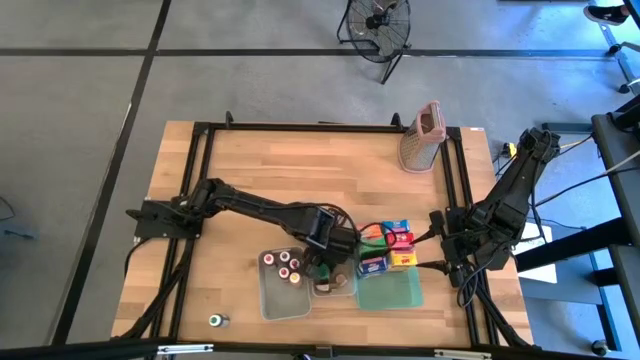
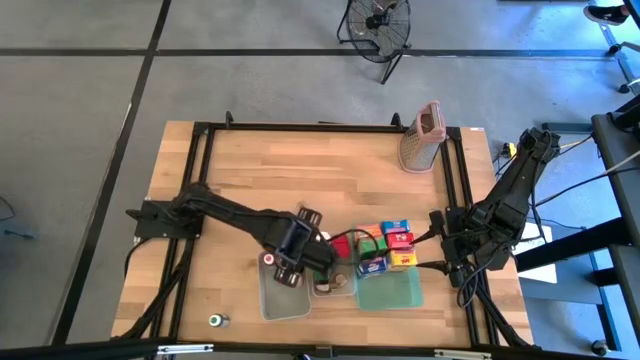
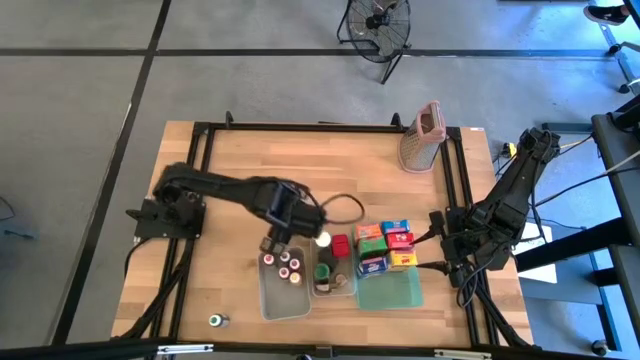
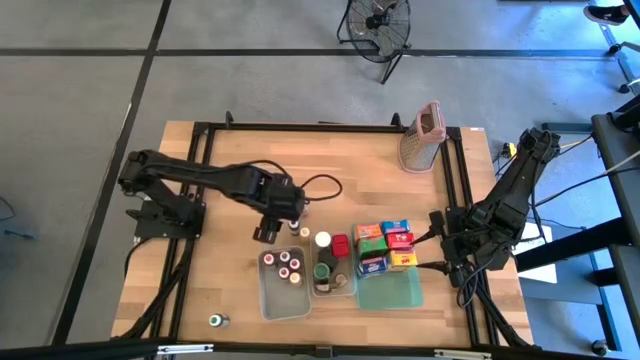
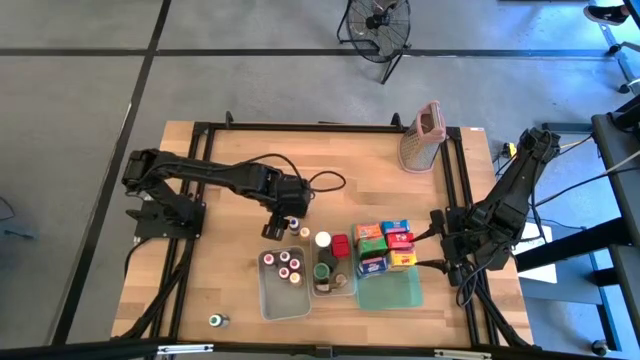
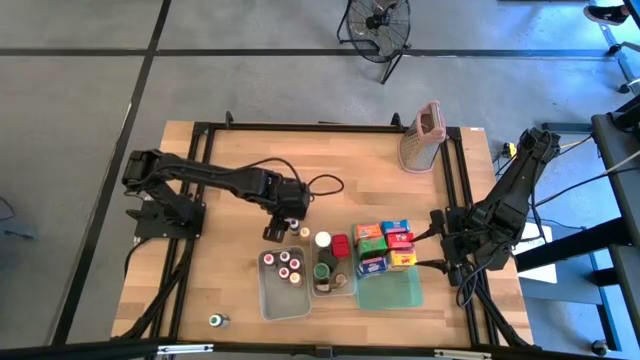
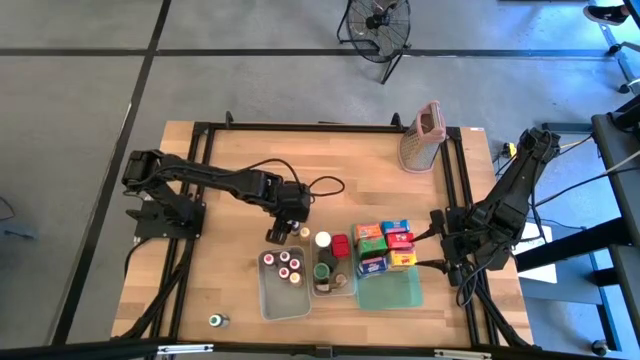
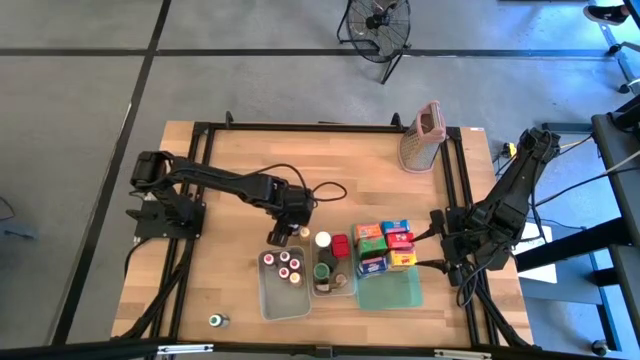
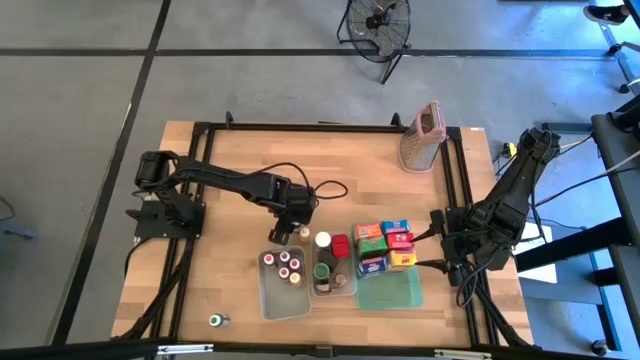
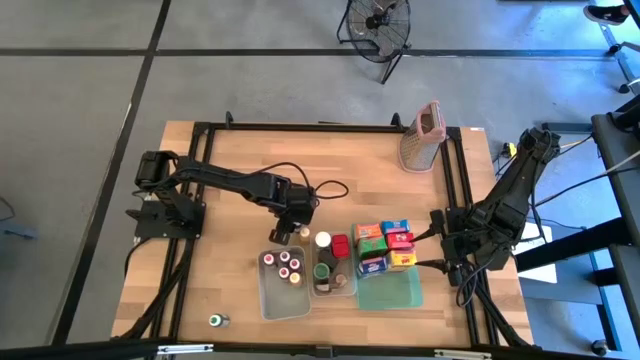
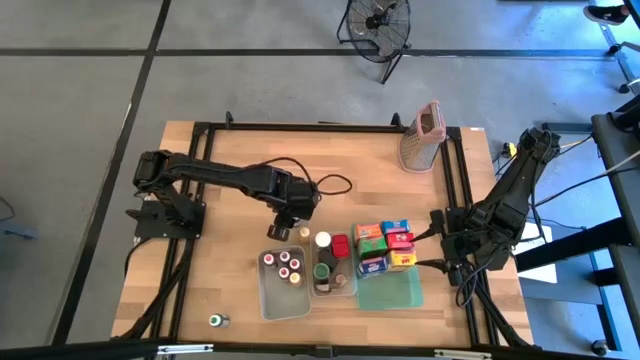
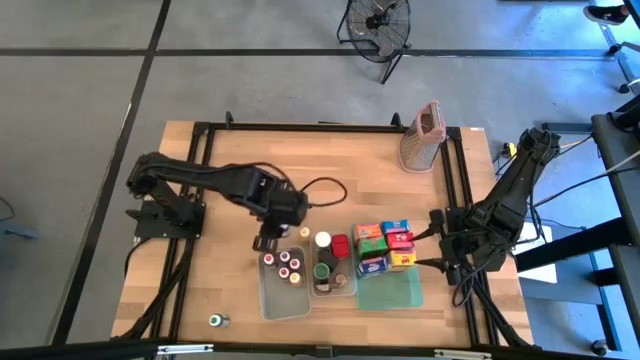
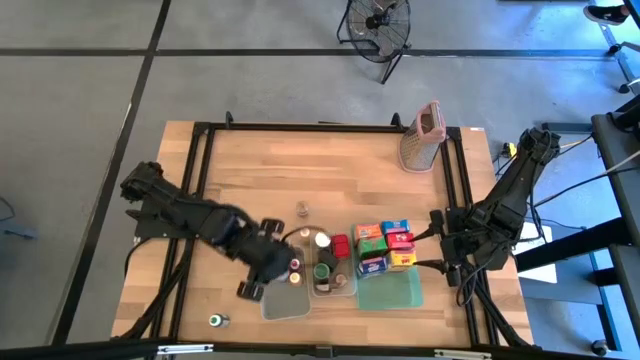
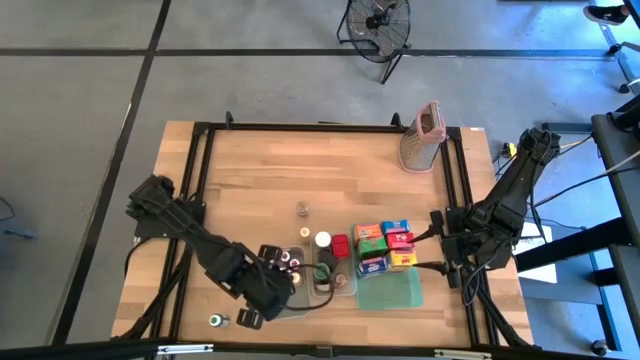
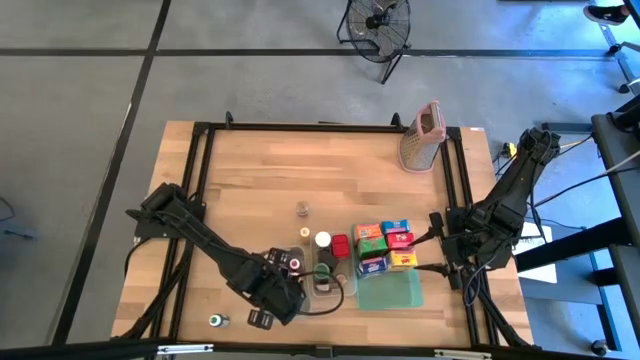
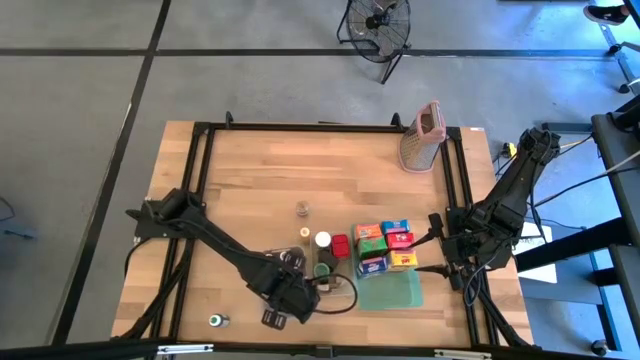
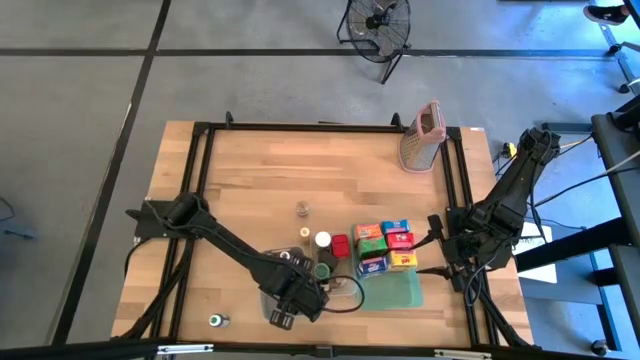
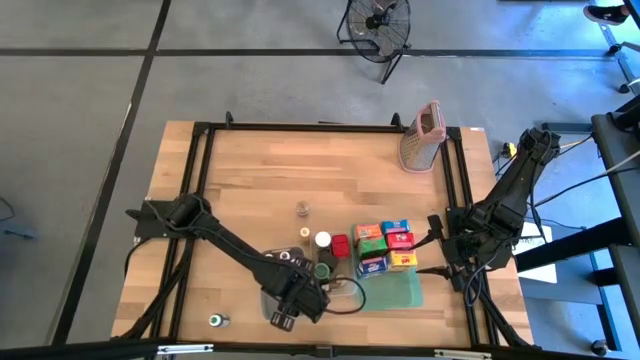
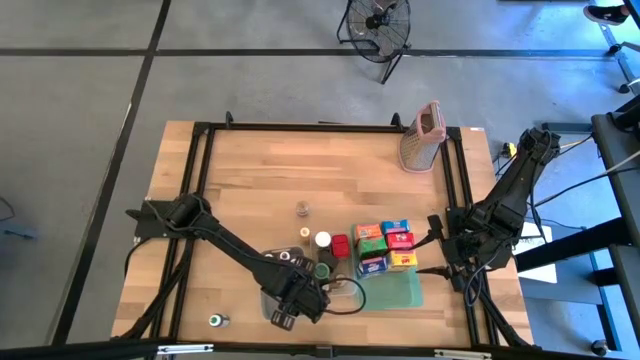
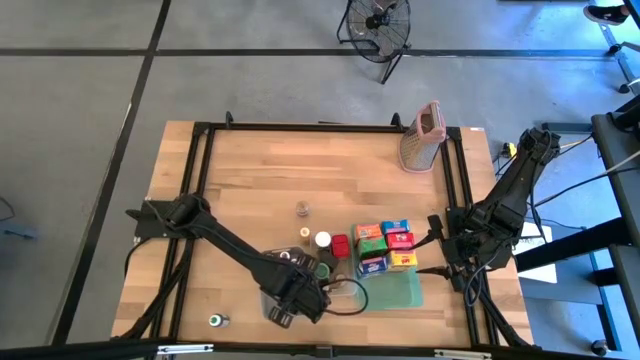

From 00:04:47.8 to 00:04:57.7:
Task: Pick & Place Kitchen Items
Put the blue food coloring bottle into the gray bin

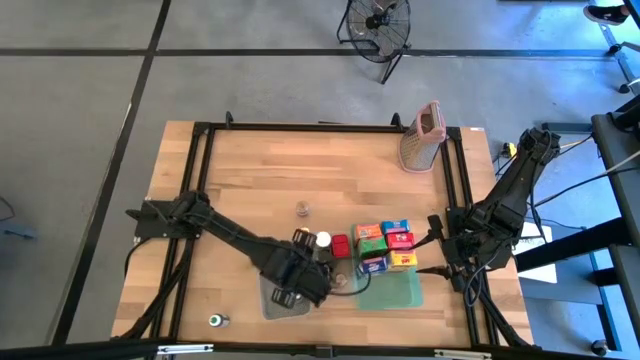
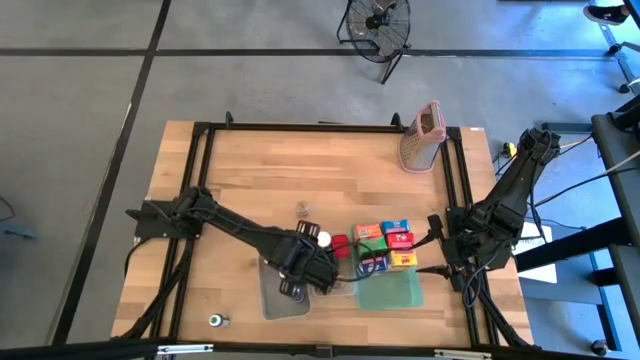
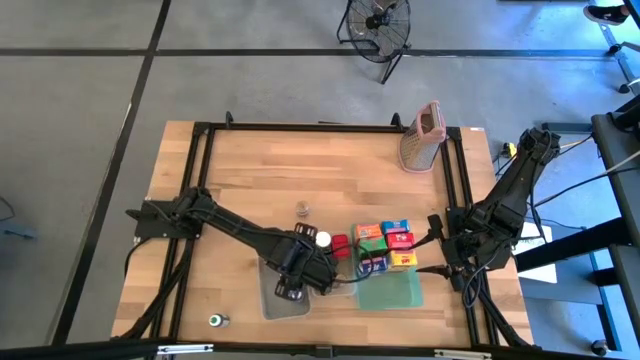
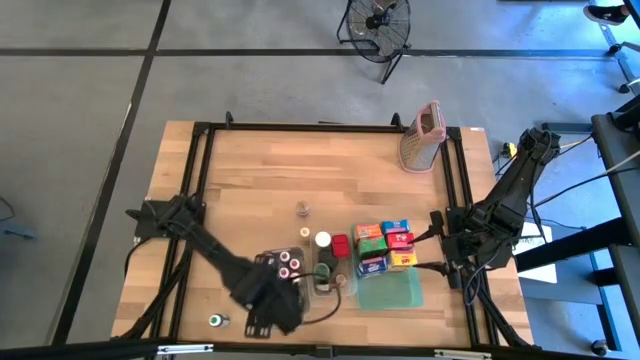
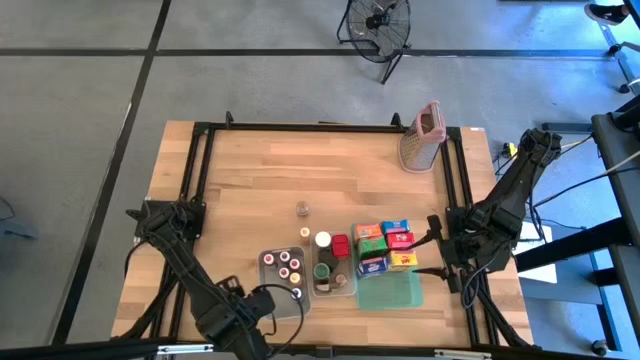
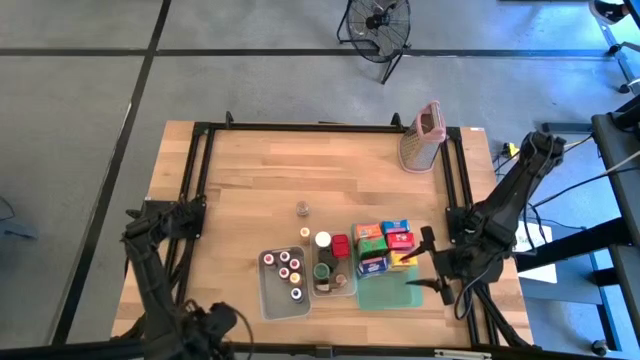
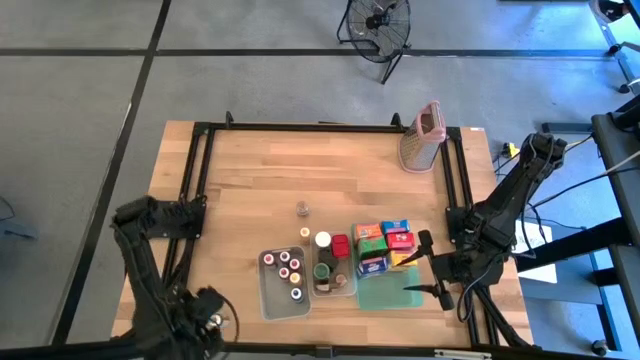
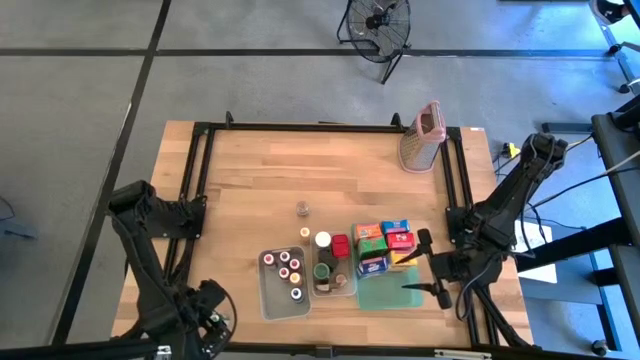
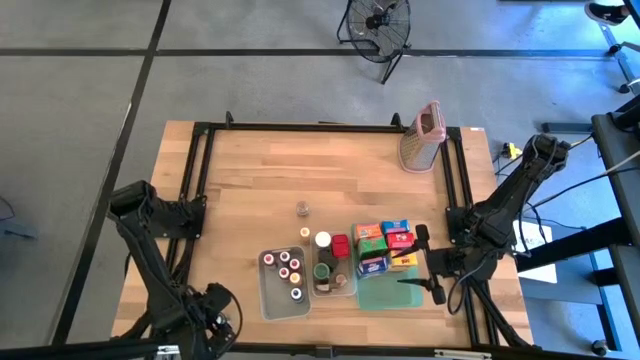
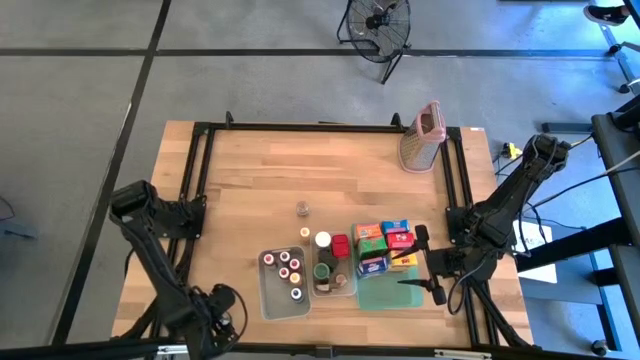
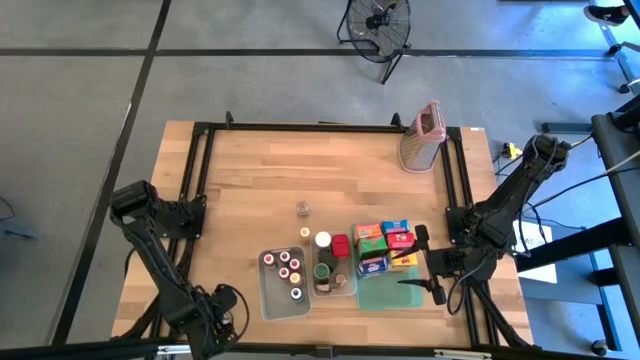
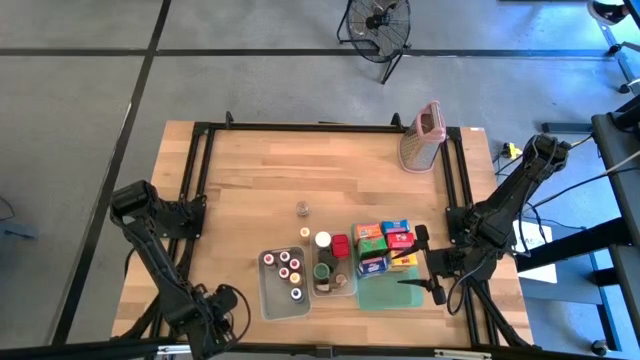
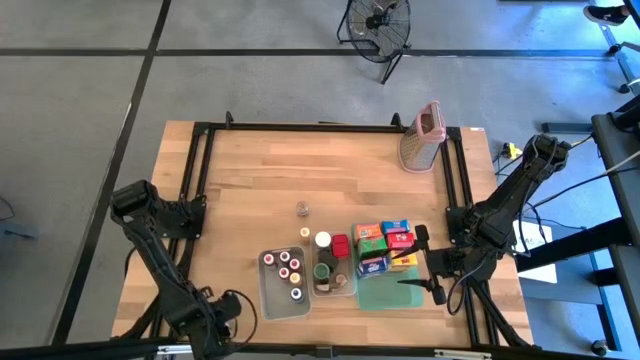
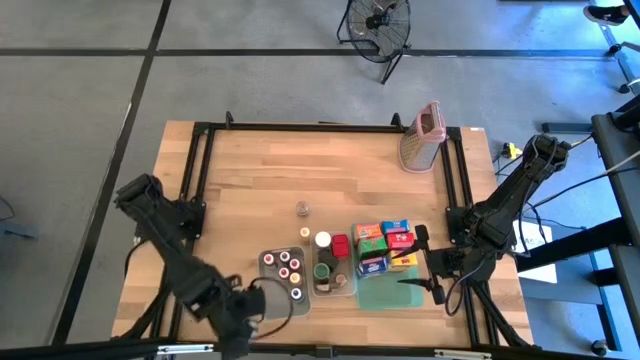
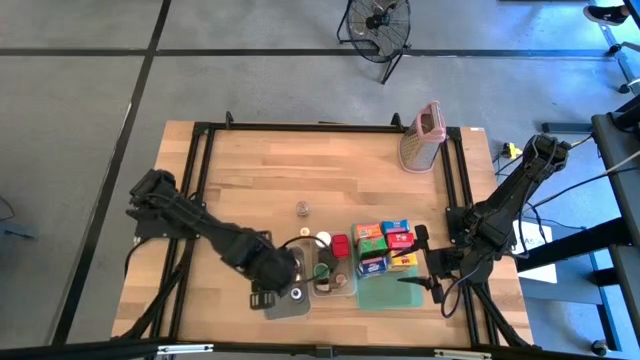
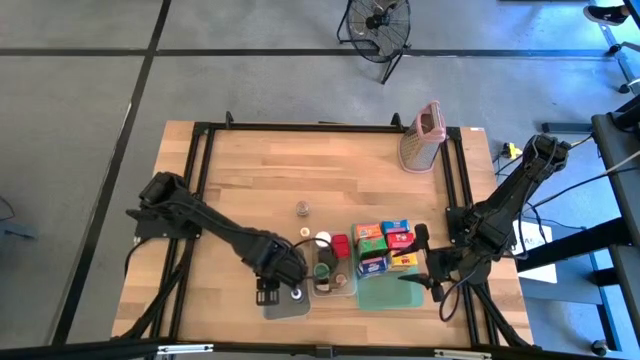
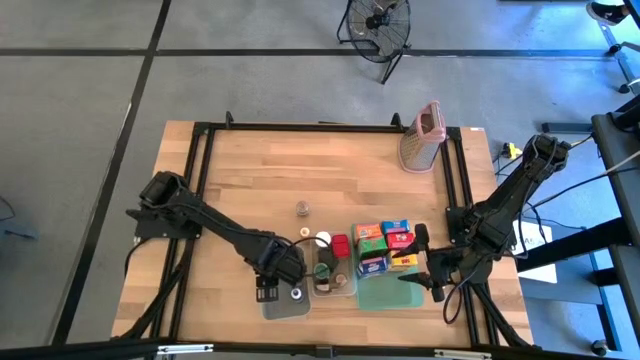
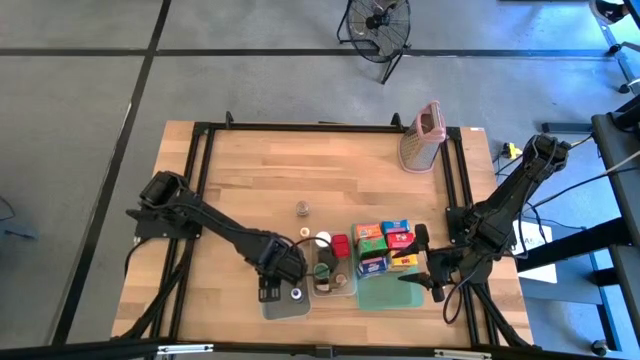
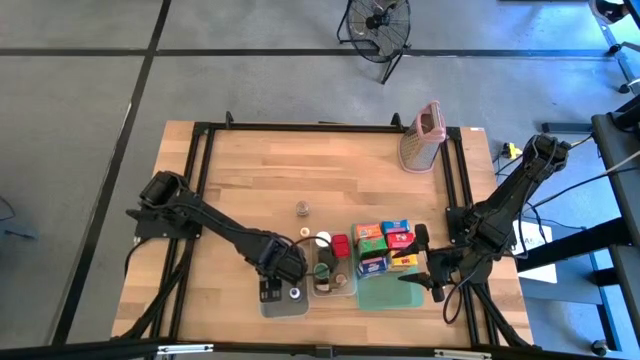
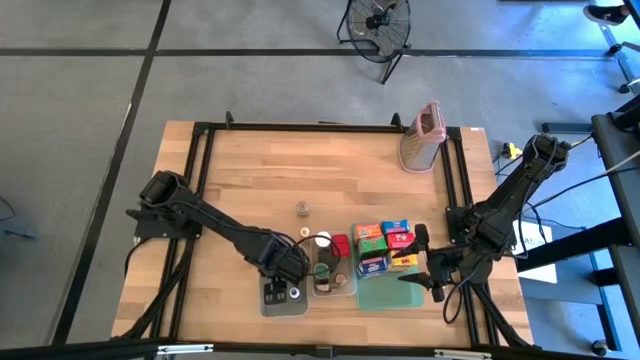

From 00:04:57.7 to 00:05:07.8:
Put the green food coloring bottle into the gray bin
